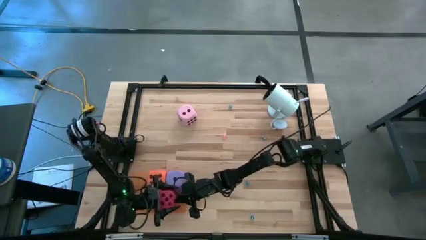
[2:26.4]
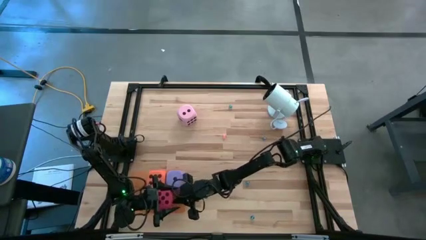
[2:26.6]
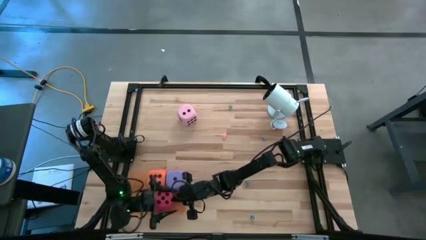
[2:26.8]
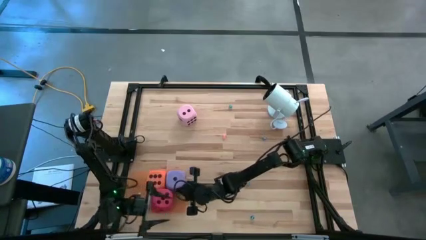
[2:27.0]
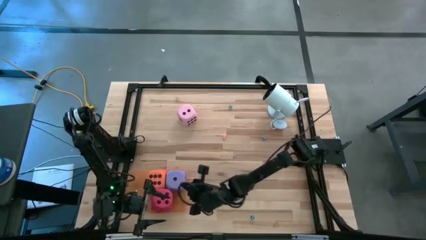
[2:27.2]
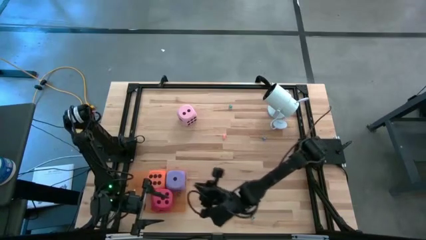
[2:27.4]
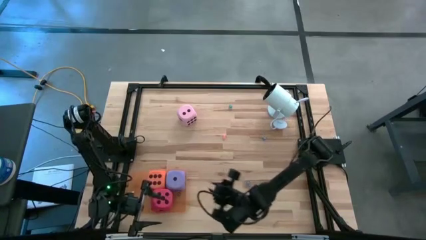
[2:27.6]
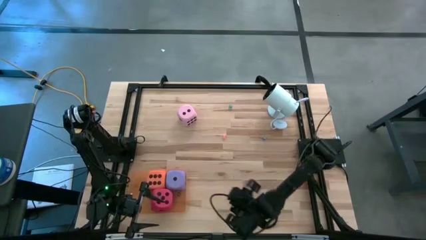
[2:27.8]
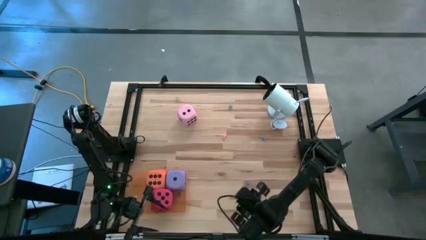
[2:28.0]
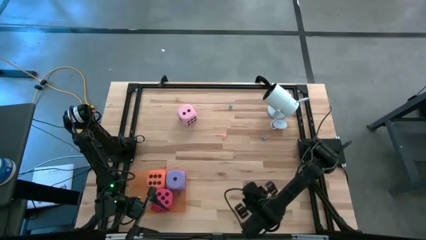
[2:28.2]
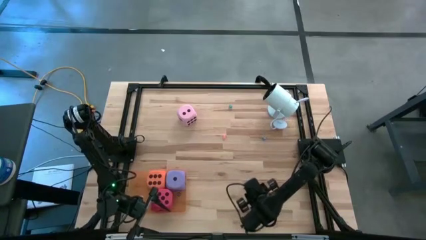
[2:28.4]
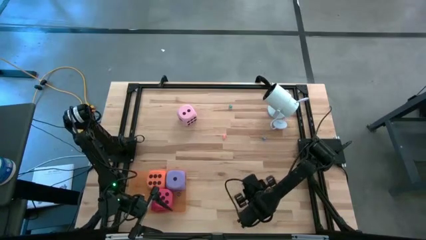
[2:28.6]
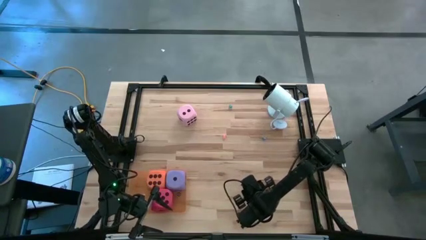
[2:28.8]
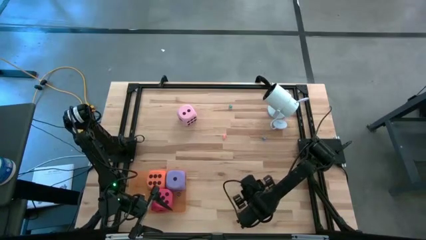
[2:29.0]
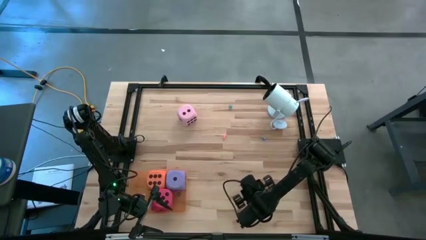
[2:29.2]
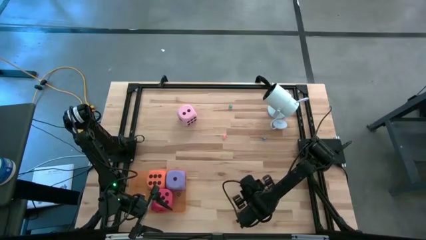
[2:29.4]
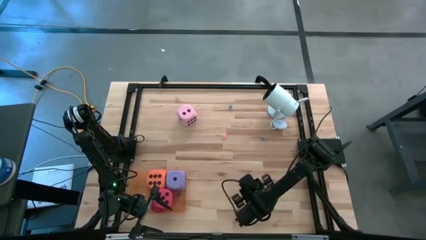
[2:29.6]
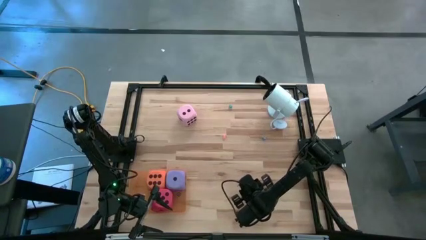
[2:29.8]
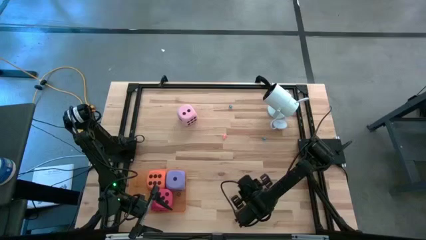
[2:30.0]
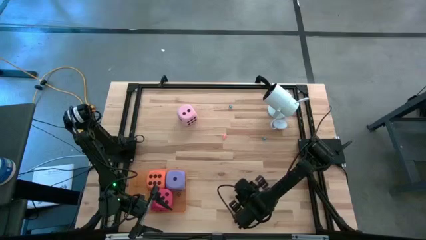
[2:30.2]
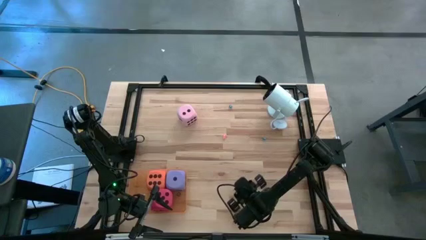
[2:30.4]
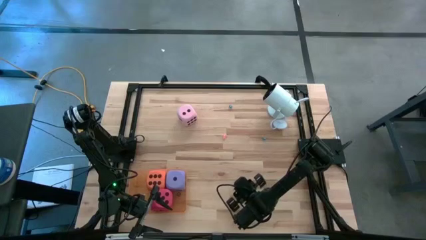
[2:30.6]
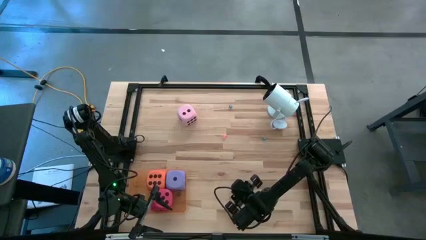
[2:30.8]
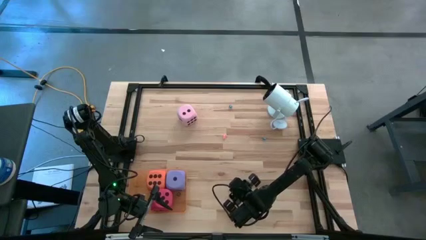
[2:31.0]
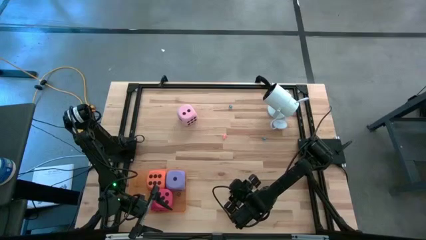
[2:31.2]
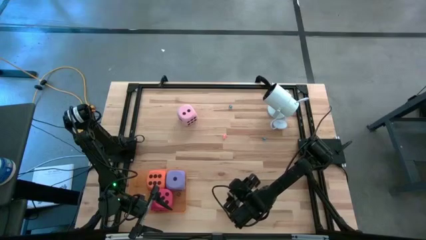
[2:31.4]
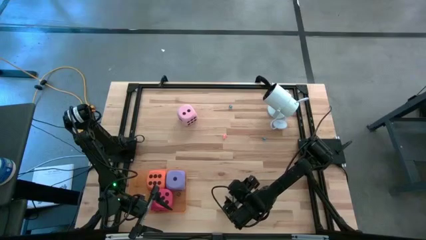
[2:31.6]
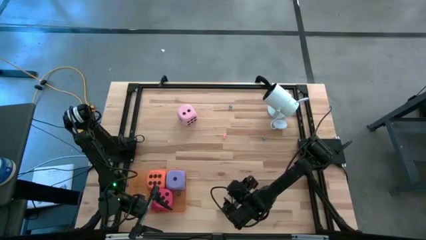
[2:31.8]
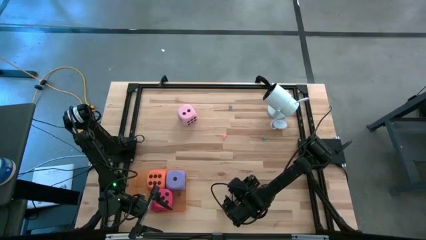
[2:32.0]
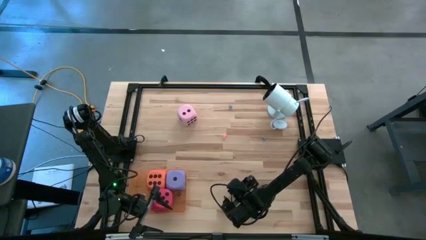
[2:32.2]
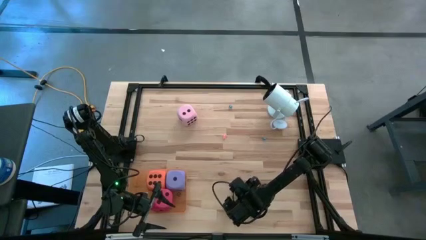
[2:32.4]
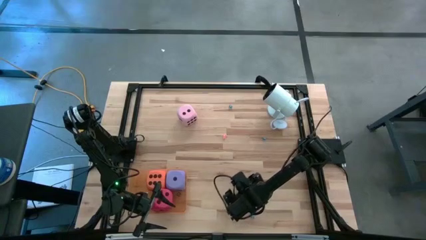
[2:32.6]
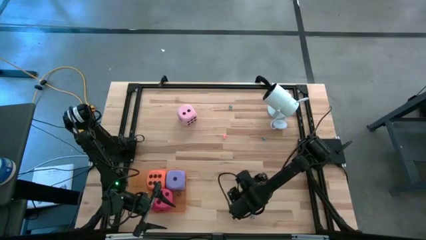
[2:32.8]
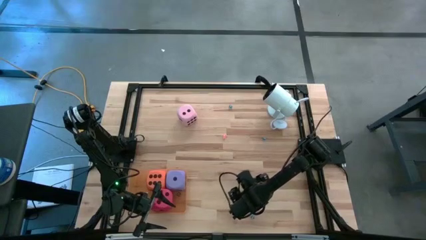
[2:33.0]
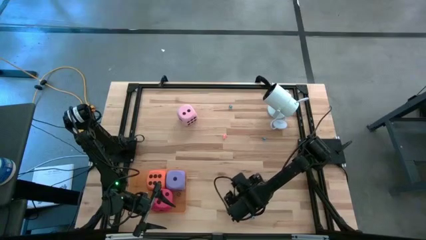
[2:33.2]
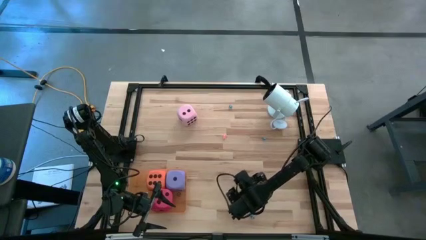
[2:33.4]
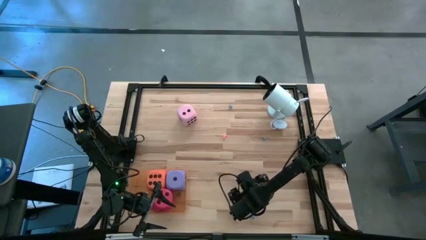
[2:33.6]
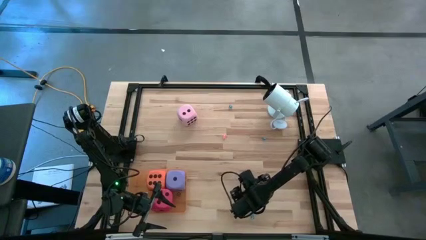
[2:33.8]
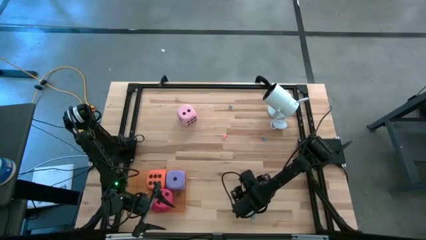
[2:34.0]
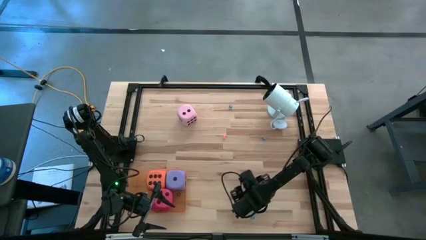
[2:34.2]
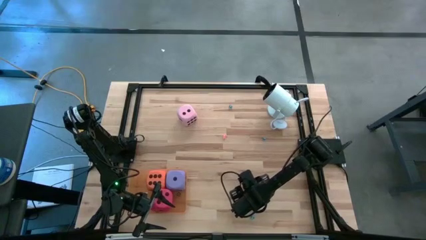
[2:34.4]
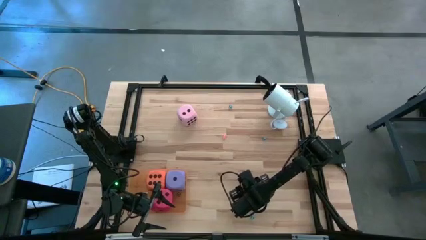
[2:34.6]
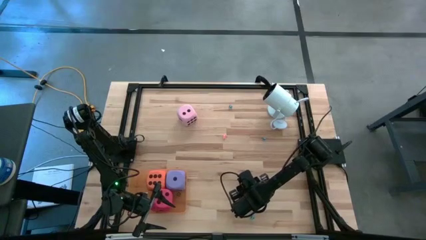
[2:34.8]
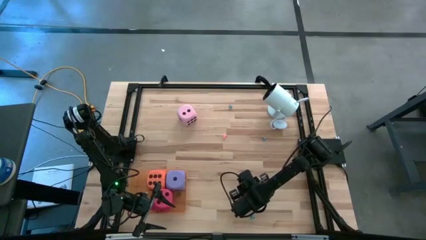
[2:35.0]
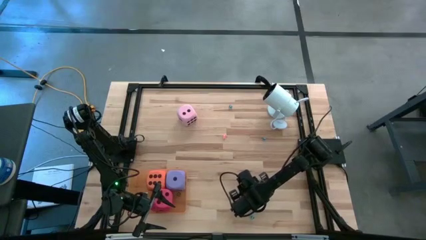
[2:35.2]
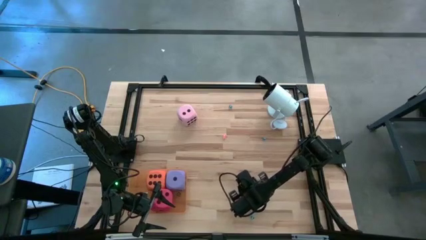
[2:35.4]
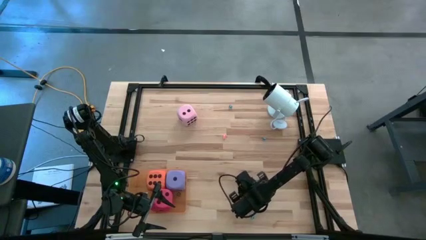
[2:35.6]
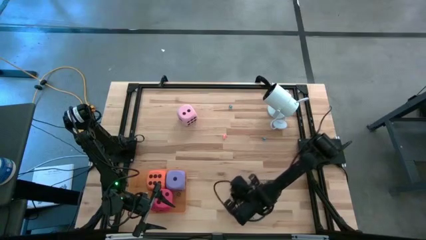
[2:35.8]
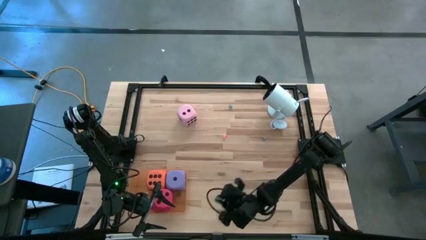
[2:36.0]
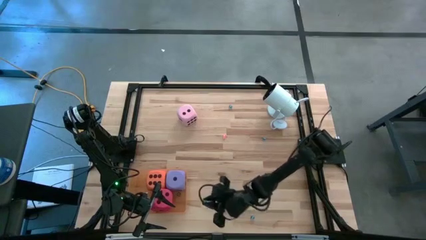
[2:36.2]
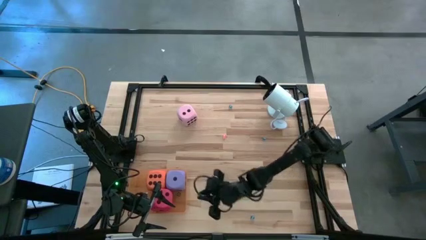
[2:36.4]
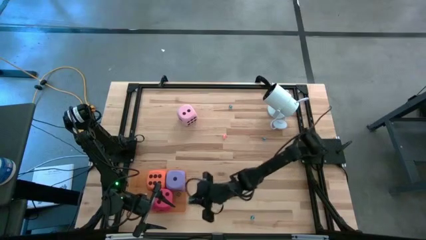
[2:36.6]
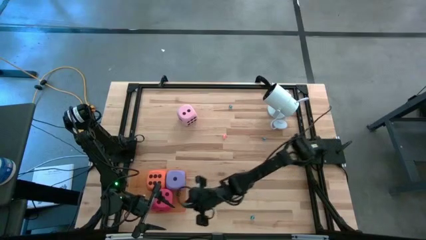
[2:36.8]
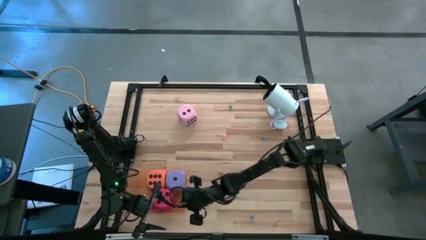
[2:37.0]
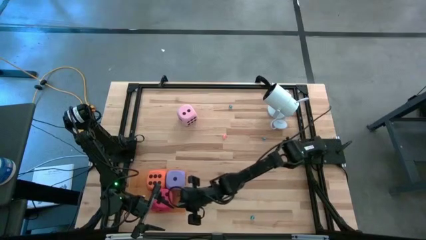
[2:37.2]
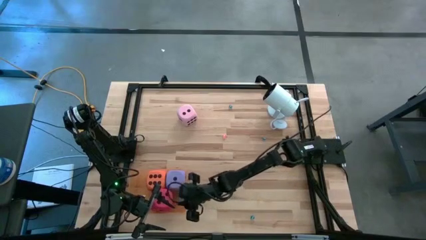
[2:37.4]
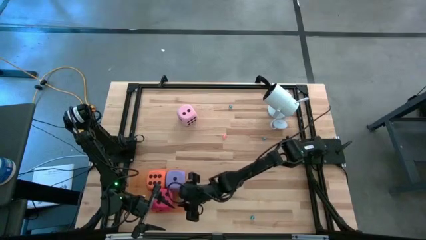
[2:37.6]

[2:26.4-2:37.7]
Task: Pick & Place Dice
Put the small blue dice into the orange bin

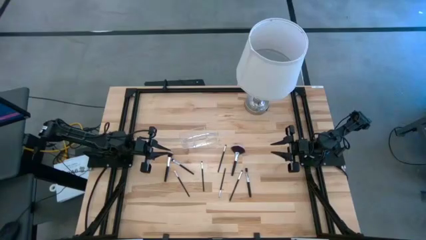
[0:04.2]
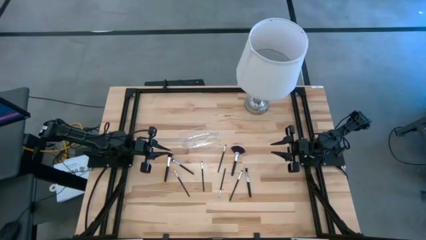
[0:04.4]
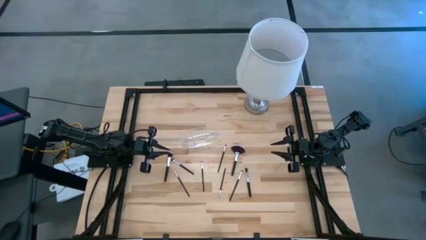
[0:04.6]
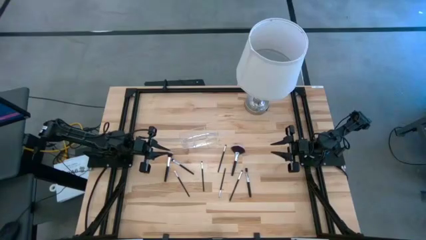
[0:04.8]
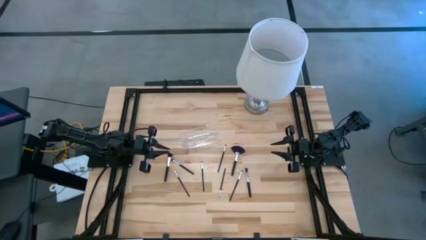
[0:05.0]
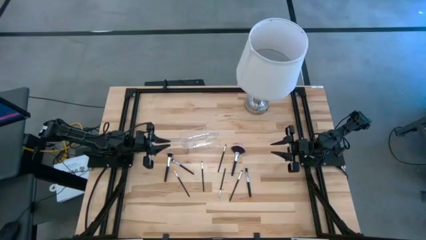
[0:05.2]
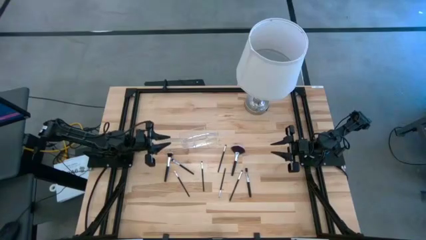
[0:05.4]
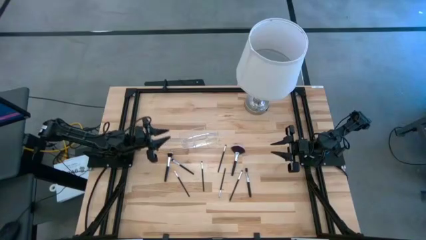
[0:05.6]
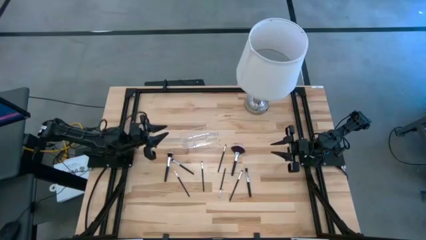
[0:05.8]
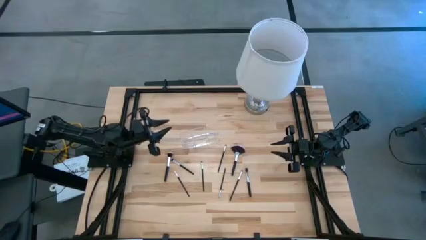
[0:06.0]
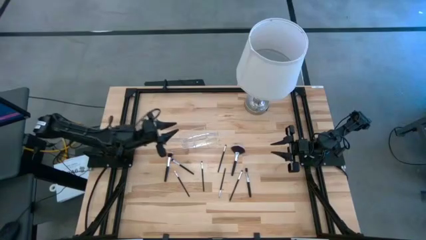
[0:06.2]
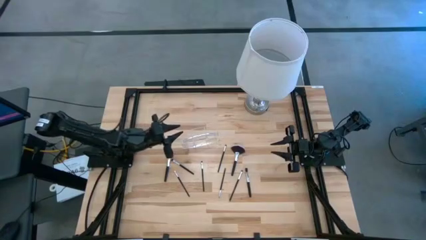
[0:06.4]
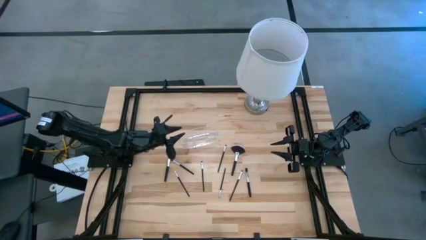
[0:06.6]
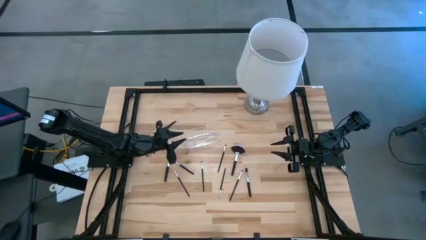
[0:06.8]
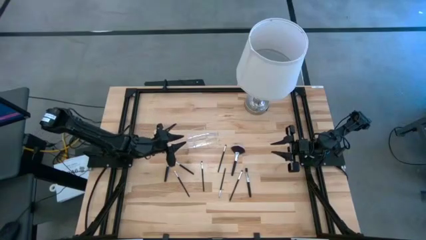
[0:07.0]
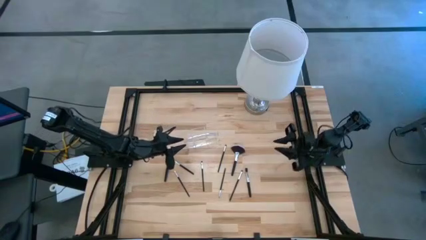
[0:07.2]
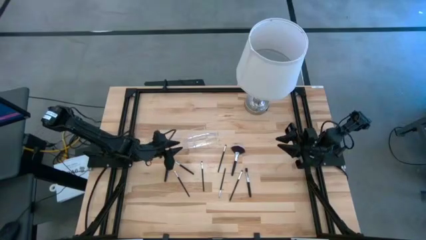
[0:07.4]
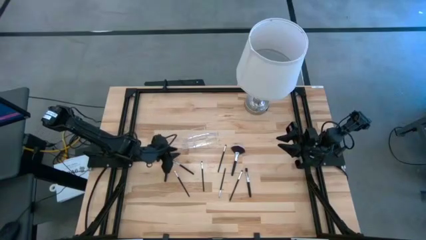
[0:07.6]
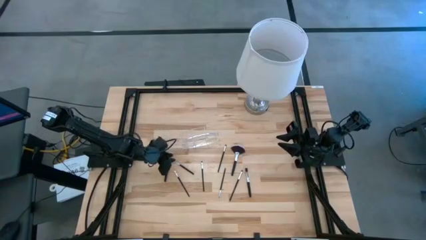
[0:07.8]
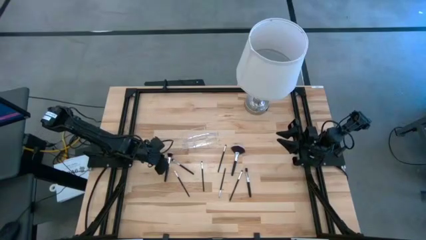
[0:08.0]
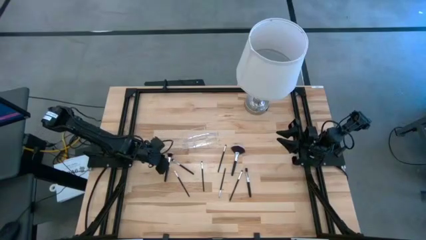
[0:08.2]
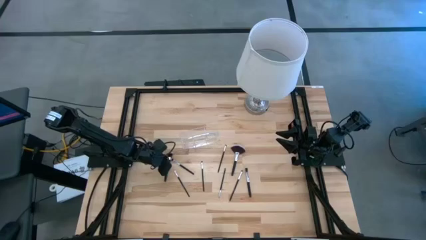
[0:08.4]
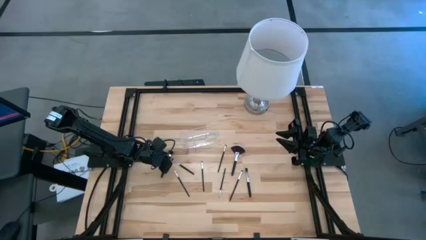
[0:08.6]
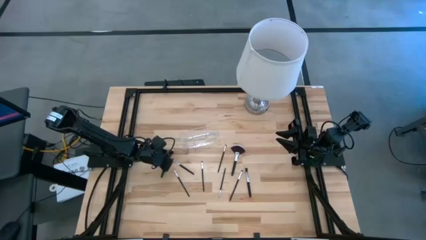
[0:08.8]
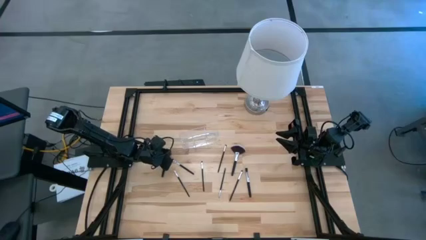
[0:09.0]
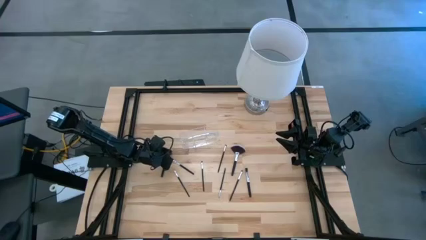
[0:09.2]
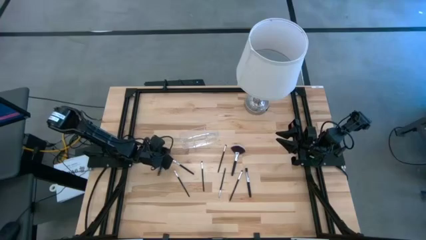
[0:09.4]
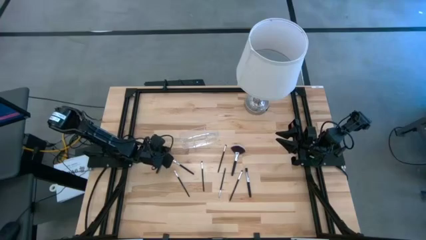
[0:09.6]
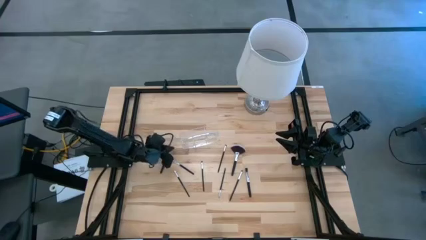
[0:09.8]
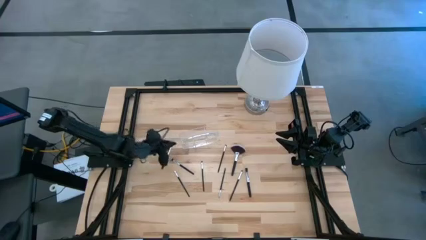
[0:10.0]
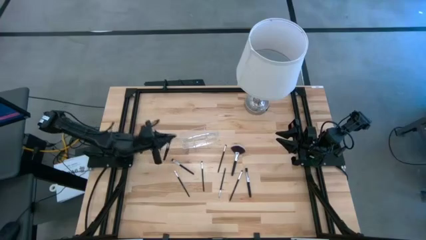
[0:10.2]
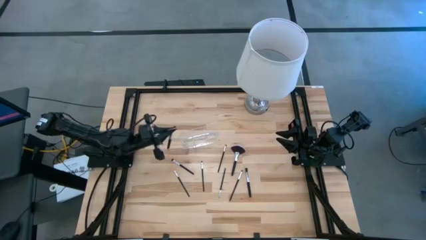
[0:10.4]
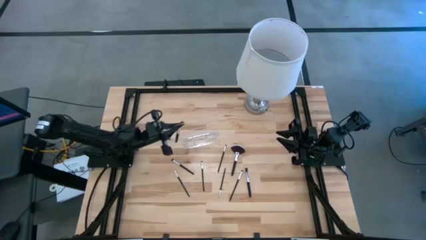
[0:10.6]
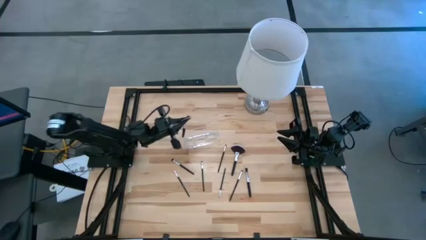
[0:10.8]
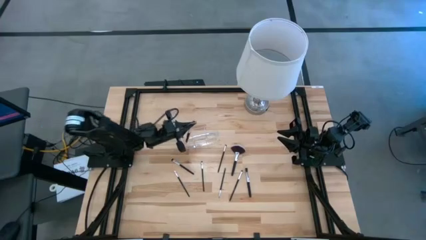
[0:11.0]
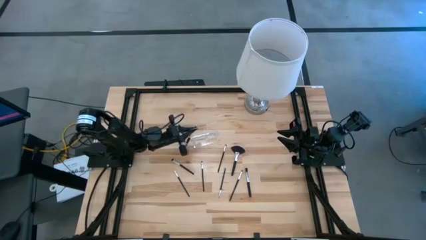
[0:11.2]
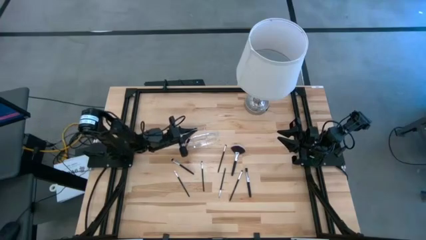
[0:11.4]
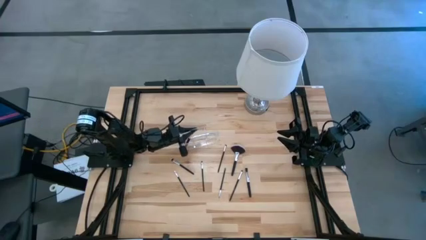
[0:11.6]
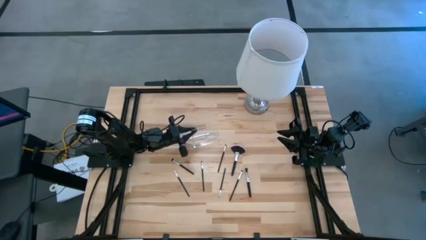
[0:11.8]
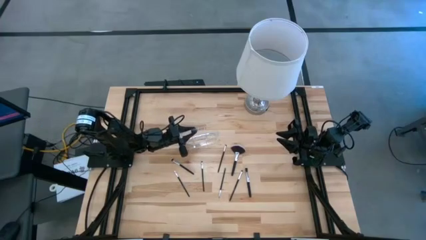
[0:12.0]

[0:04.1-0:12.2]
Task: Put items in baskets/containers
Put the powder brush into the left transparent organizer
